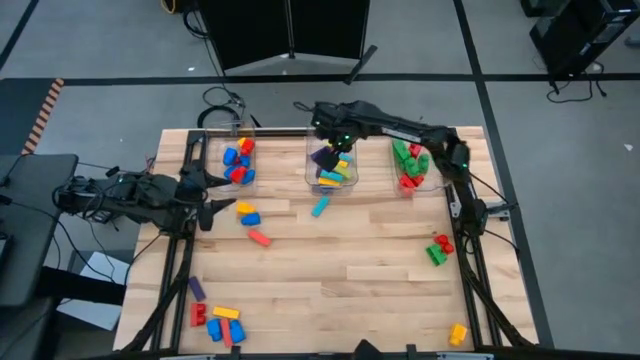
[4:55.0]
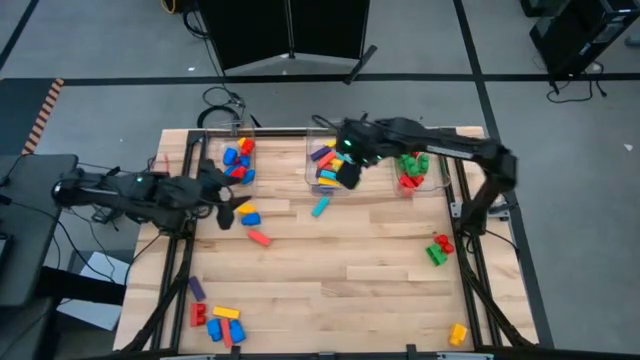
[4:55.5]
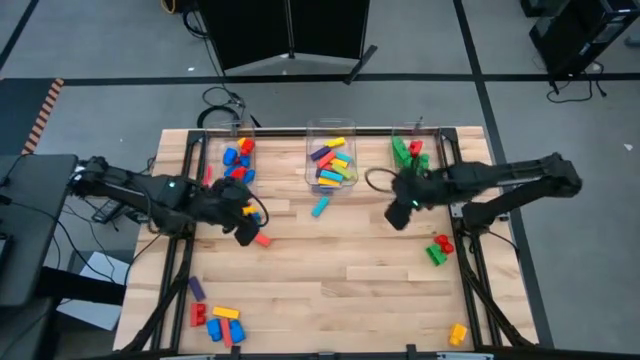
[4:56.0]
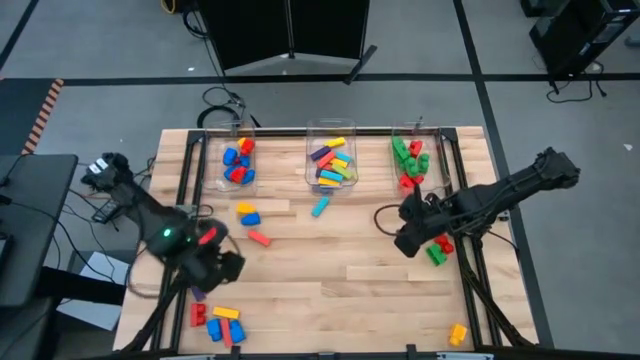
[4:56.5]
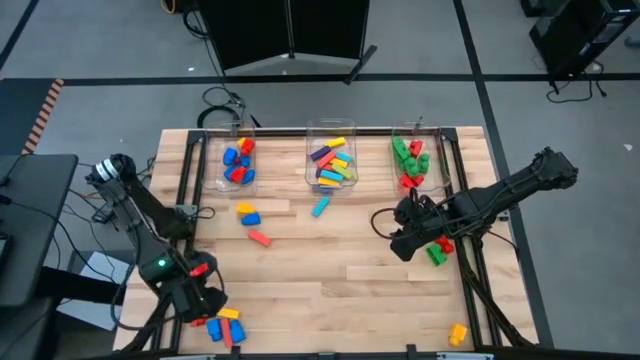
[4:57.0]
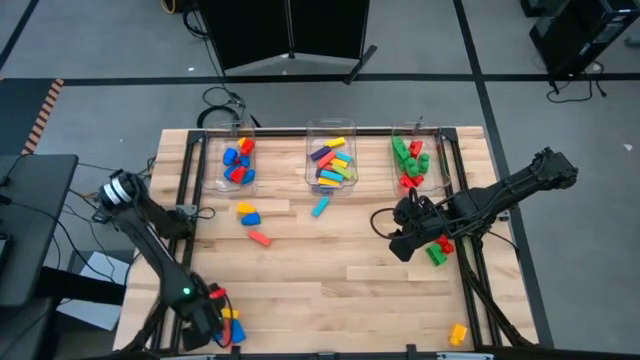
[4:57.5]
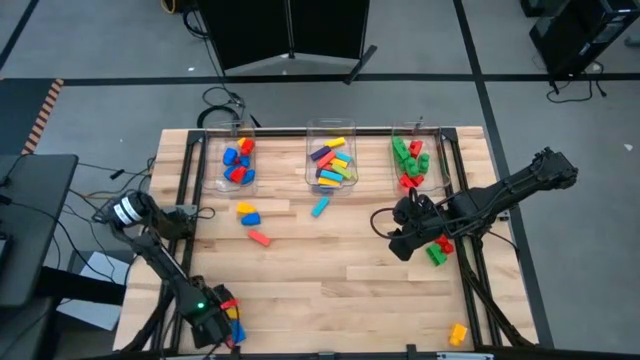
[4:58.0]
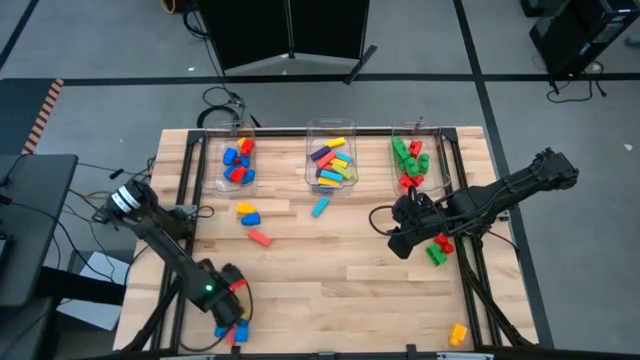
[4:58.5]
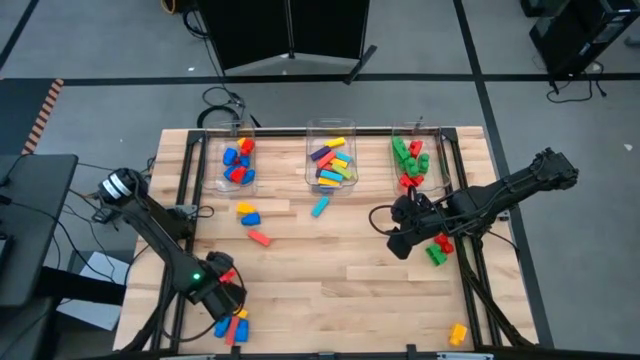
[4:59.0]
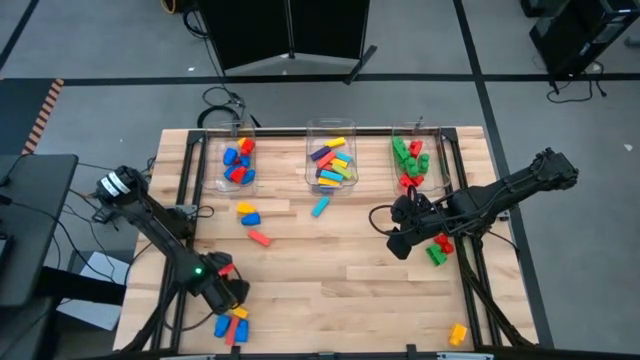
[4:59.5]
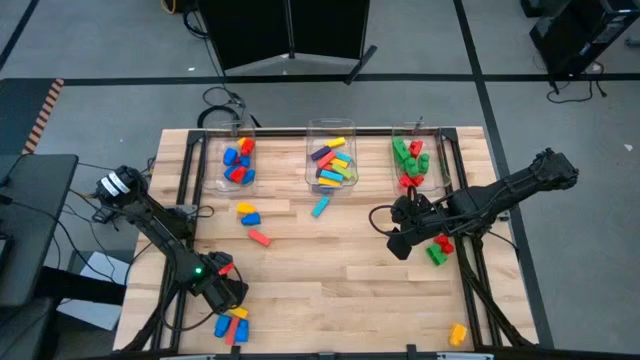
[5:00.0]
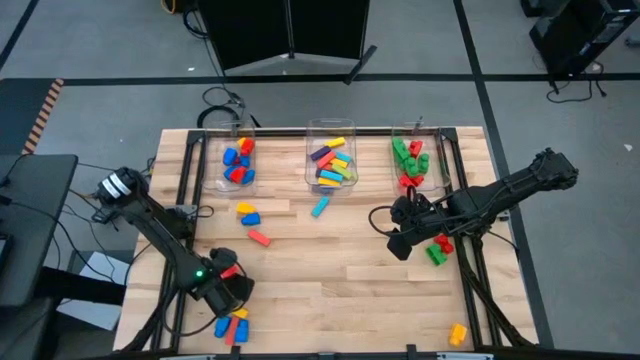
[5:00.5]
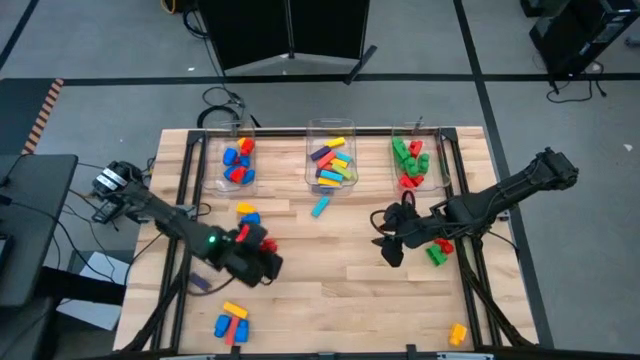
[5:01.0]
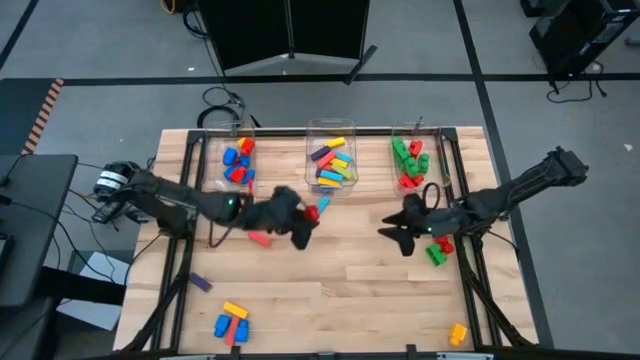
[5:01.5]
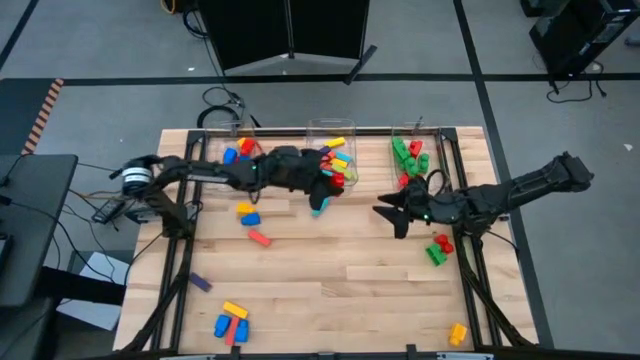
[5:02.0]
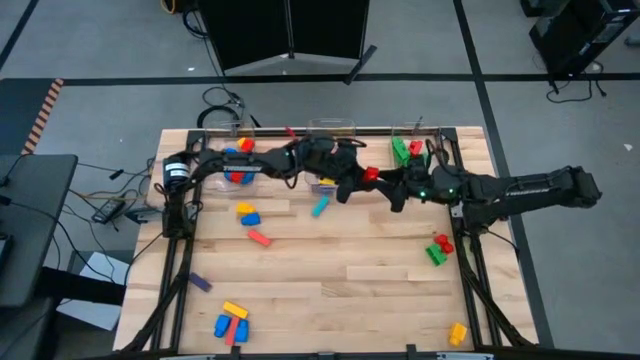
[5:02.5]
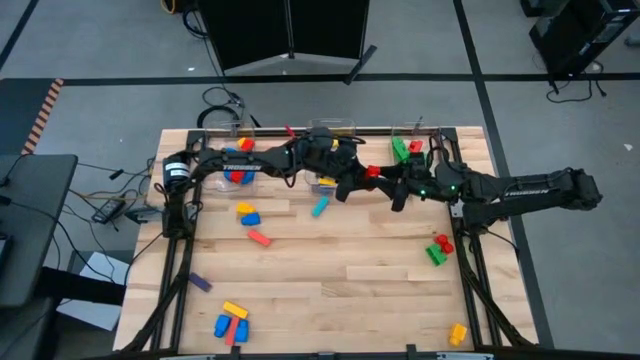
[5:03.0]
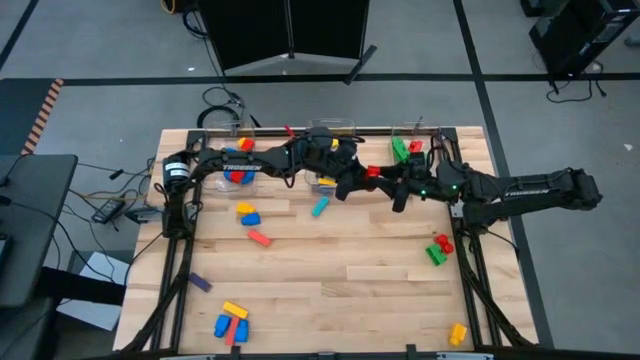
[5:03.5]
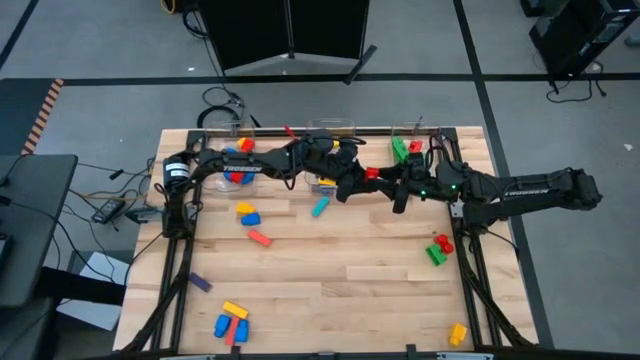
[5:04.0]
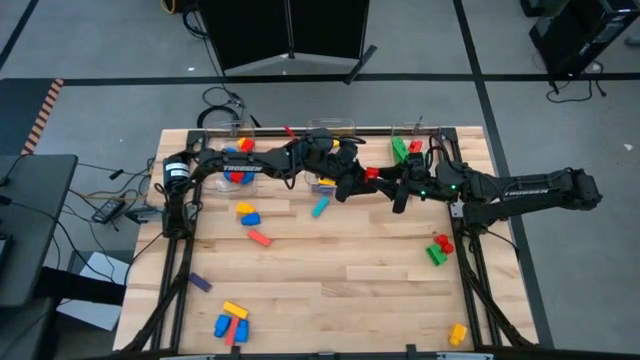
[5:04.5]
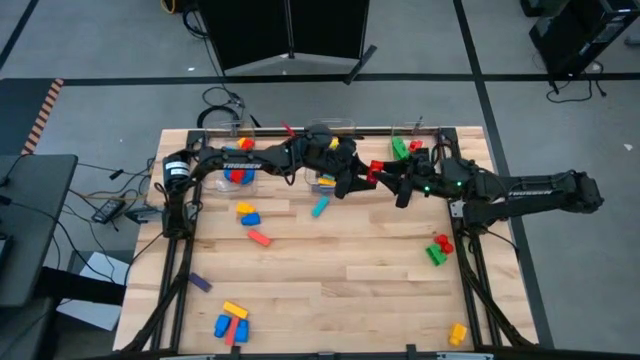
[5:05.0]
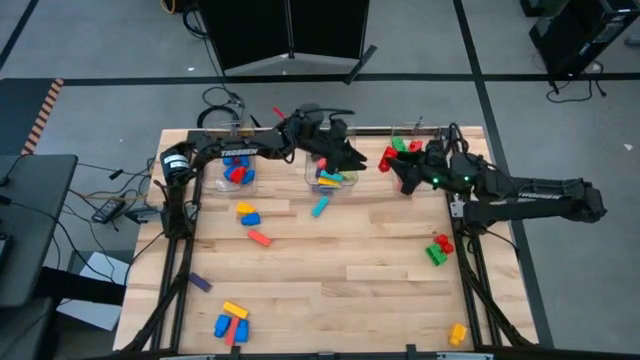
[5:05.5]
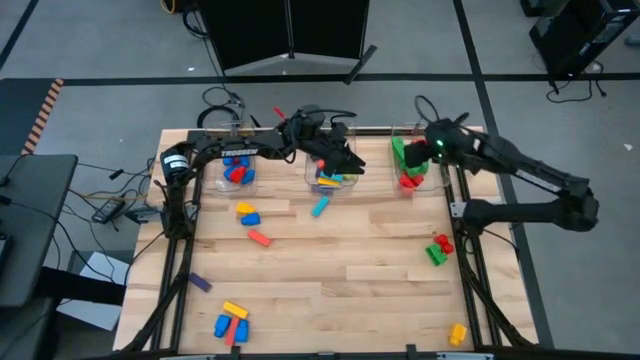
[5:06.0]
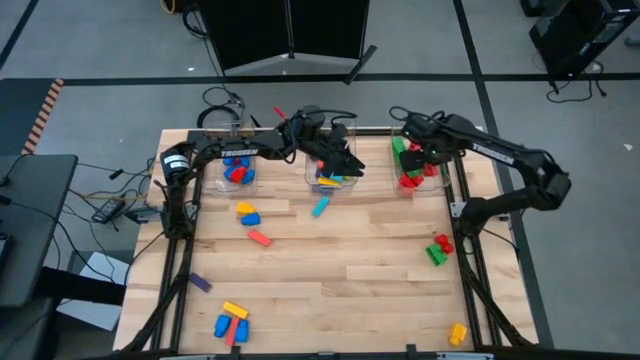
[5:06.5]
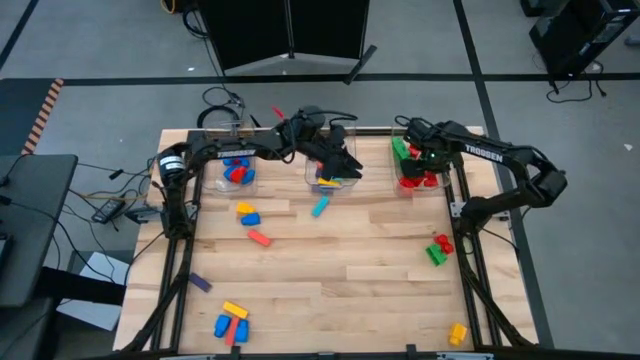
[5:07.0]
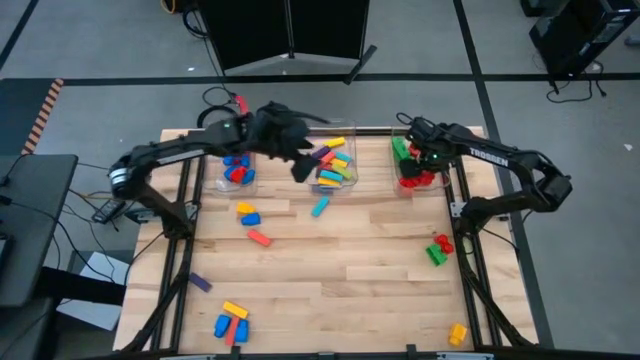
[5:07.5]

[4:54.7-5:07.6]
Task: Sort blocks by size
Put the red 2 stud game piece into the right transparent bin

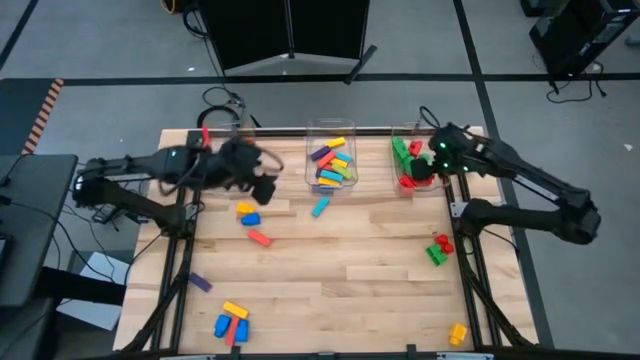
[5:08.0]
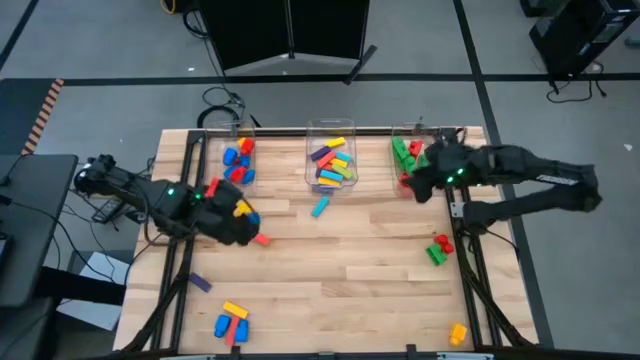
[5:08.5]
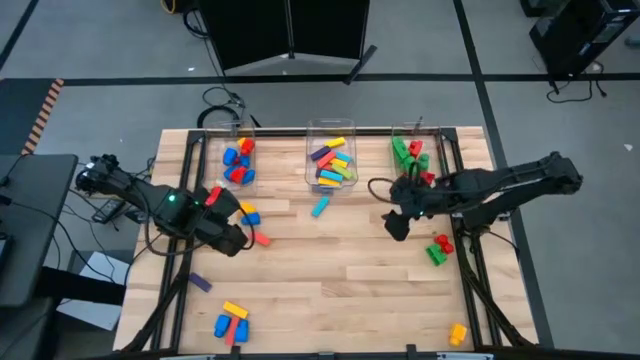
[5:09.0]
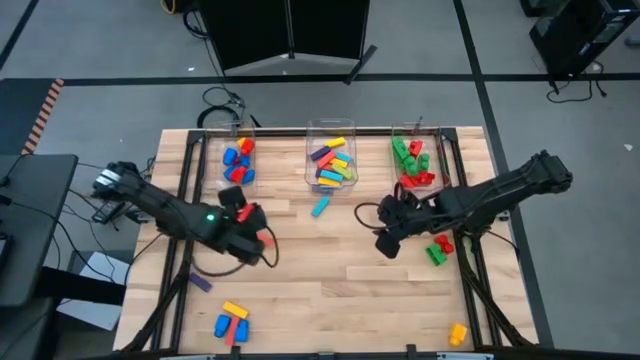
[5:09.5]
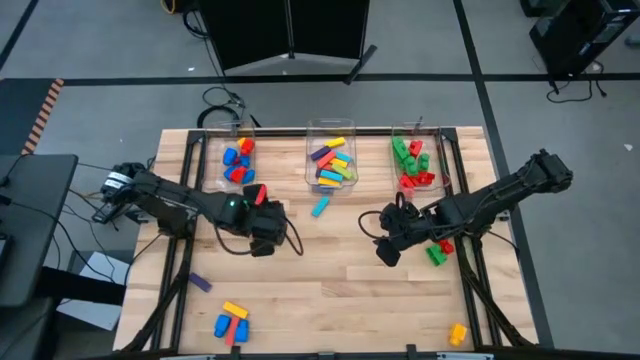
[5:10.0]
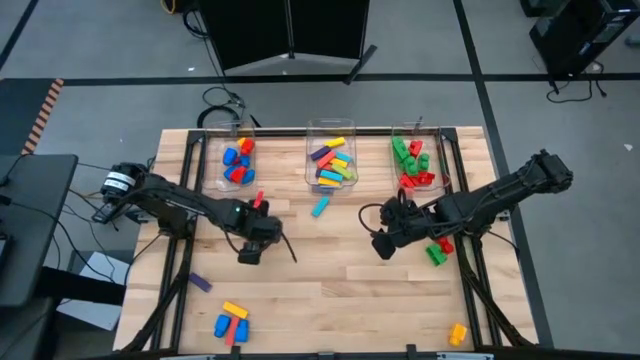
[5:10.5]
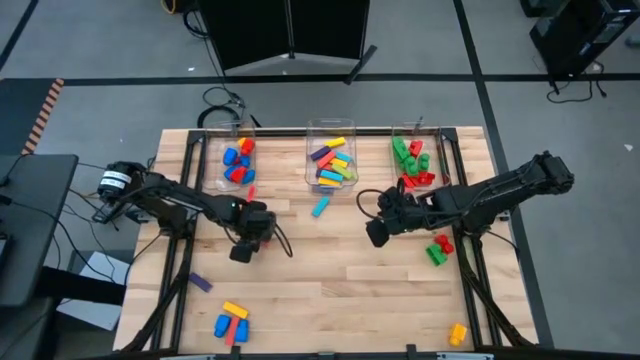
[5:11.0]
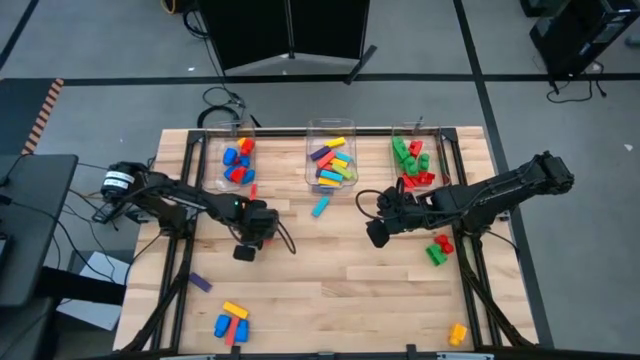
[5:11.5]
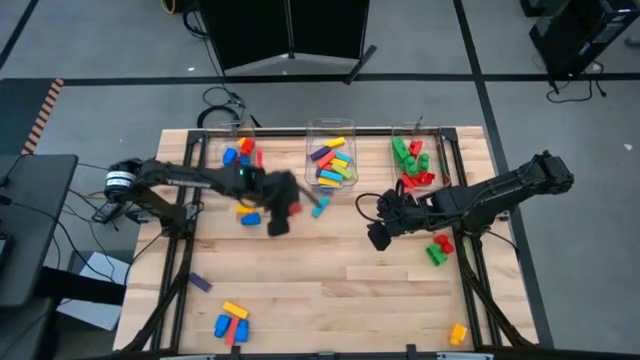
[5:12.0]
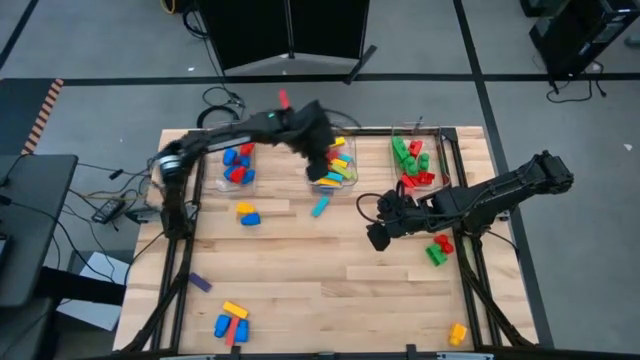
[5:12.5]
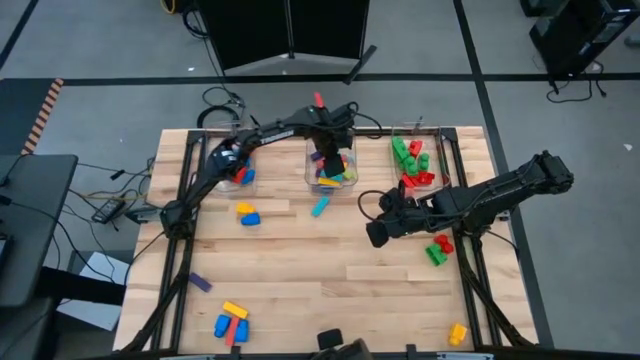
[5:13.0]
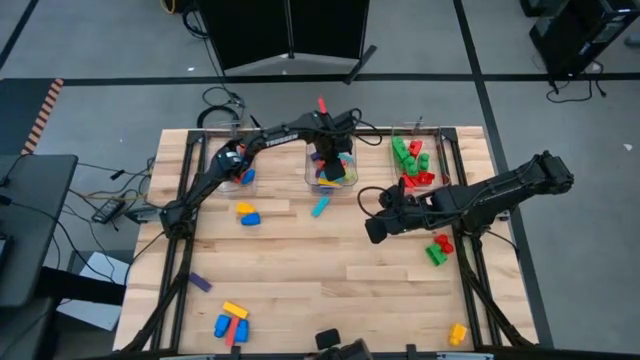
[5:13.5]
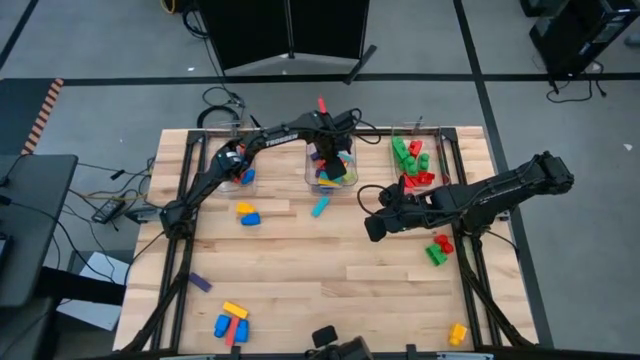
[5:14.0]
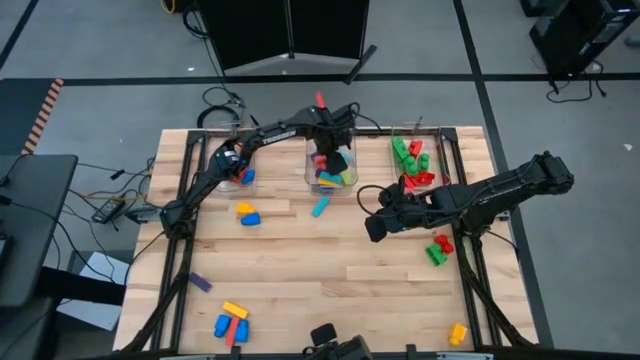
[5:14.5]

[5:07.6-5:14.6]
Put the red block into the middle transparent bin

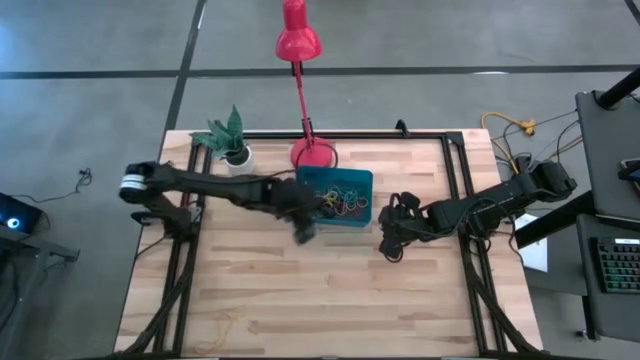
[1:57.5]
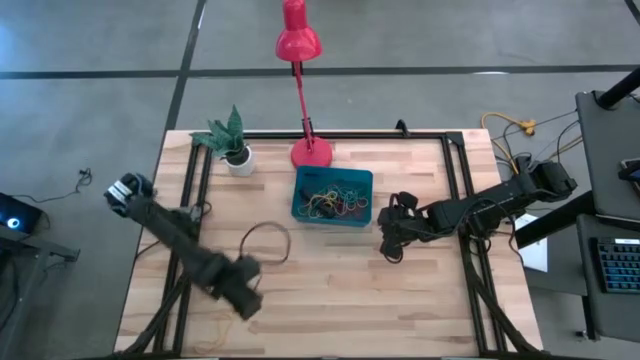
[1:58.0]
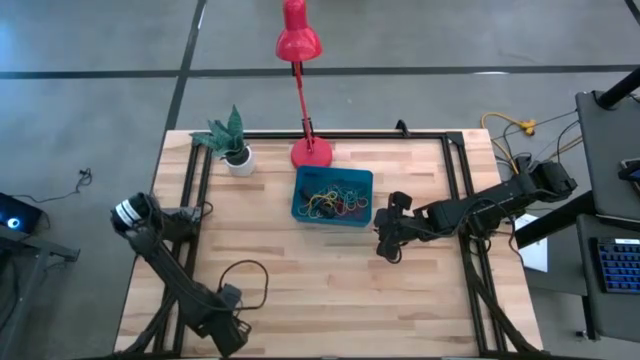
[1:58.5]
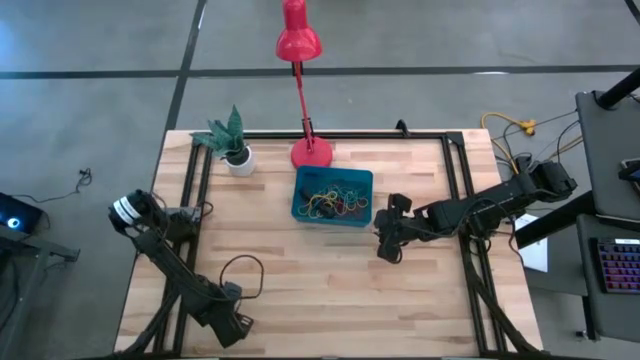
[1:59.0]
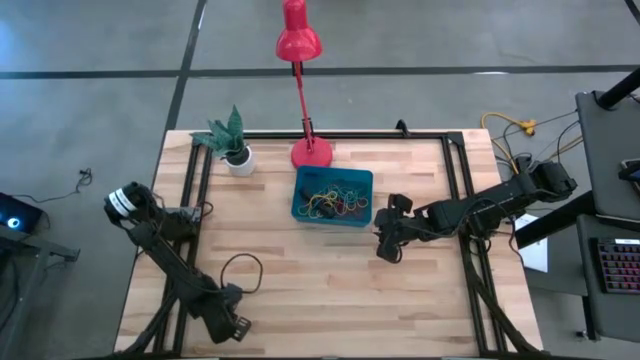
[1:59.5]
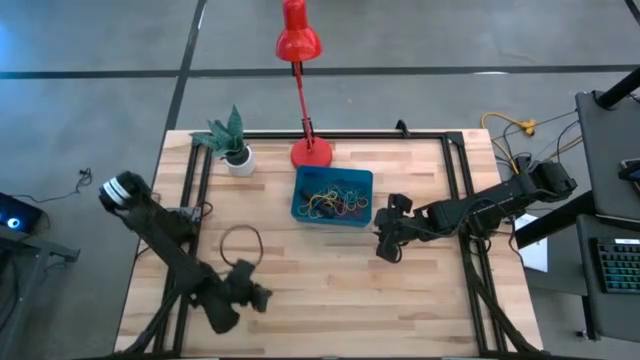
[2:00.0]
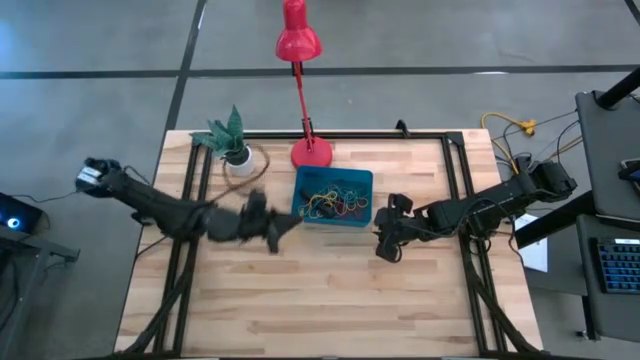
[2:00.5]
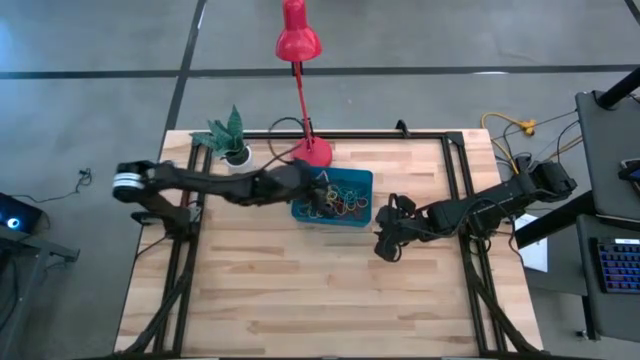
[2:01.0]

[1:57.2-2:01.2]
Task: Pick and place rubber bands into bin
Put the yellow rubber band into the blue bin
